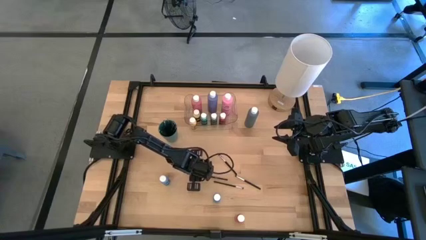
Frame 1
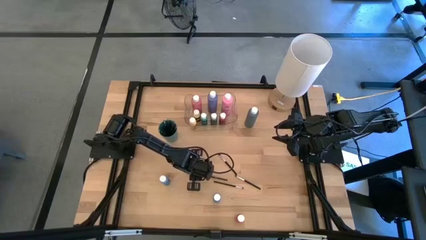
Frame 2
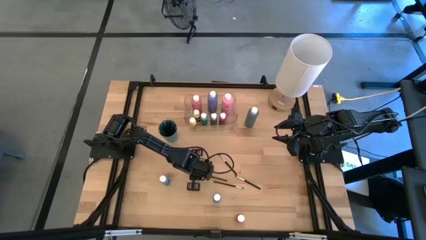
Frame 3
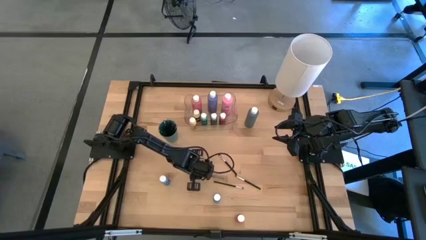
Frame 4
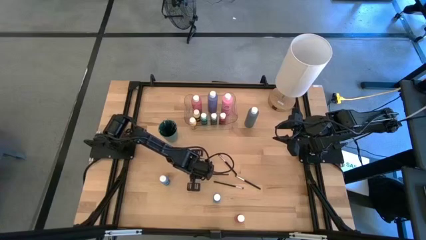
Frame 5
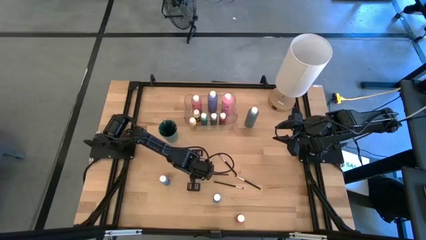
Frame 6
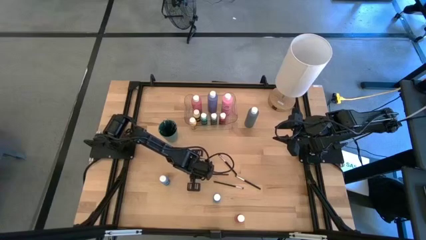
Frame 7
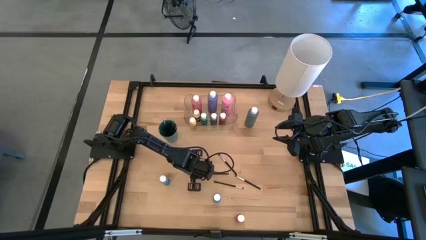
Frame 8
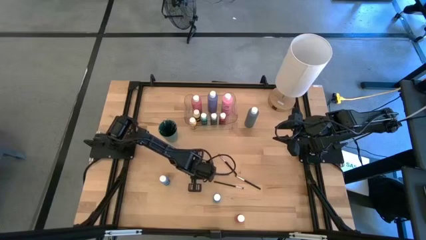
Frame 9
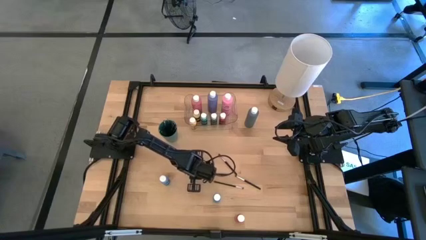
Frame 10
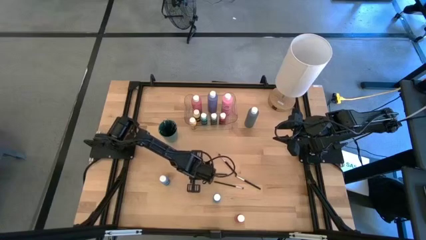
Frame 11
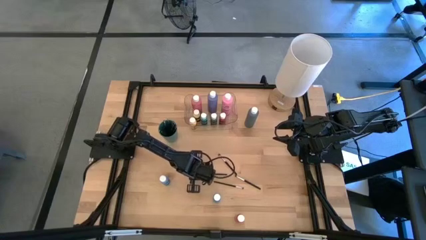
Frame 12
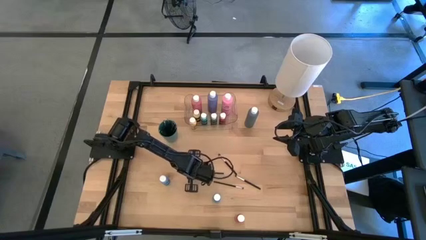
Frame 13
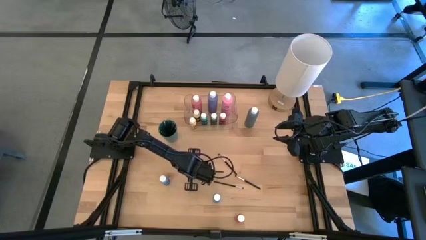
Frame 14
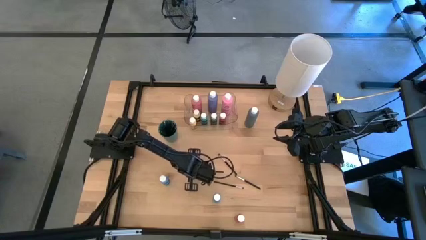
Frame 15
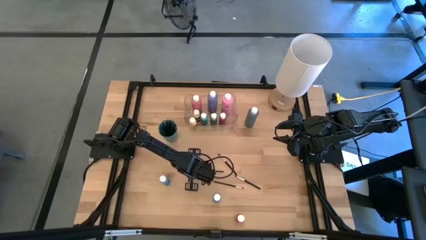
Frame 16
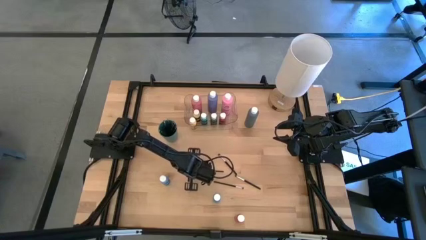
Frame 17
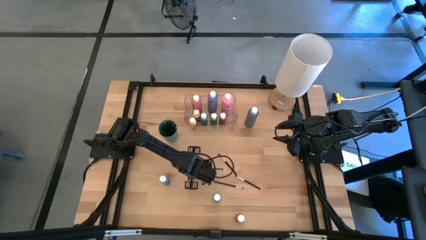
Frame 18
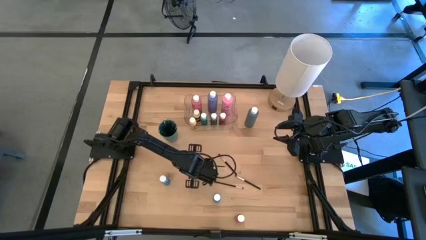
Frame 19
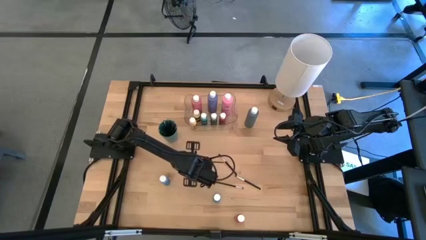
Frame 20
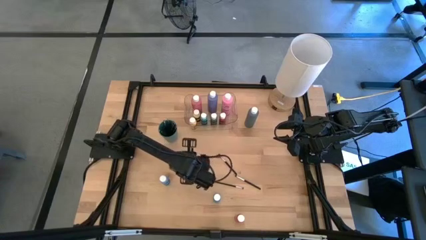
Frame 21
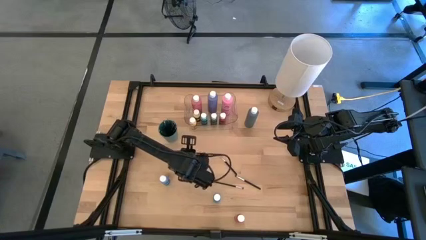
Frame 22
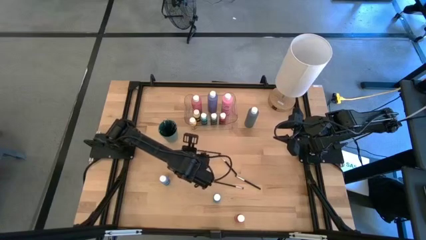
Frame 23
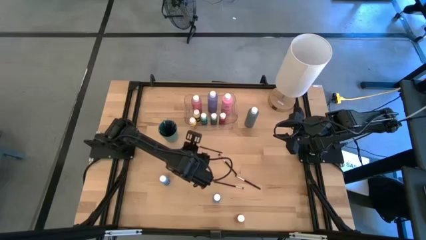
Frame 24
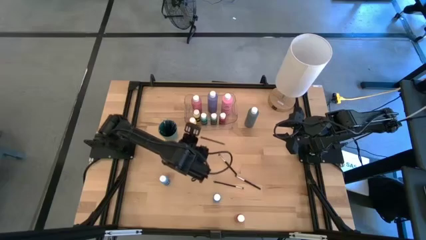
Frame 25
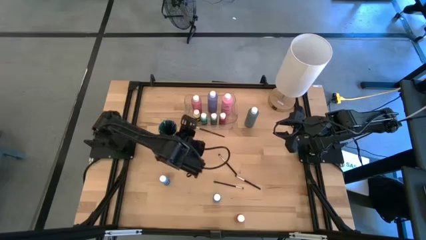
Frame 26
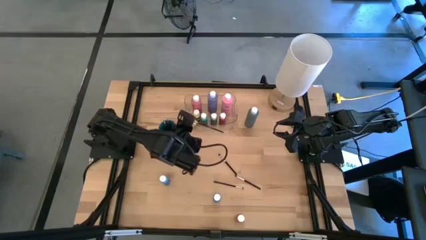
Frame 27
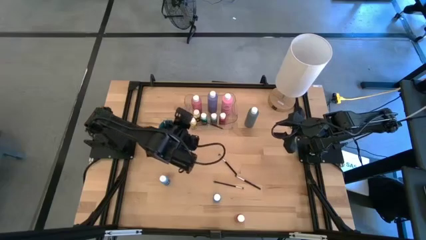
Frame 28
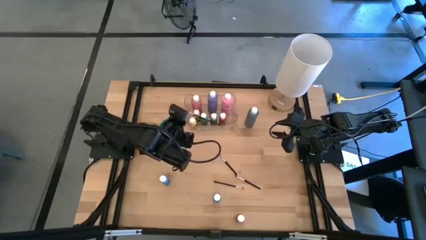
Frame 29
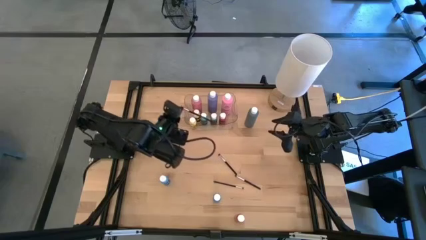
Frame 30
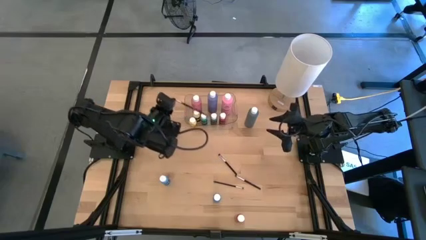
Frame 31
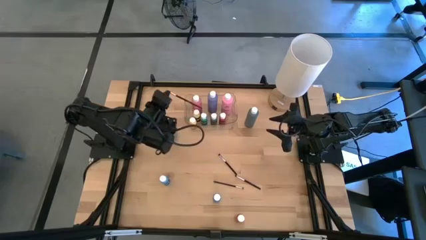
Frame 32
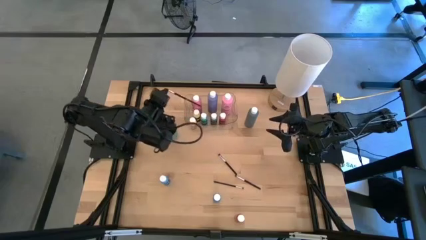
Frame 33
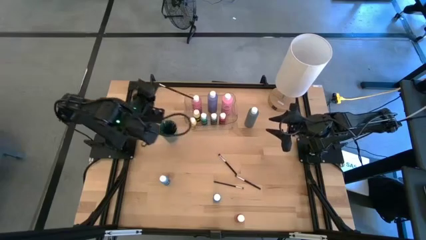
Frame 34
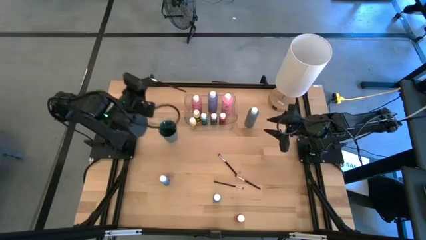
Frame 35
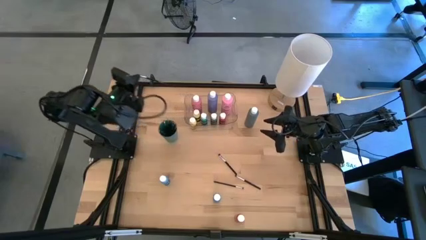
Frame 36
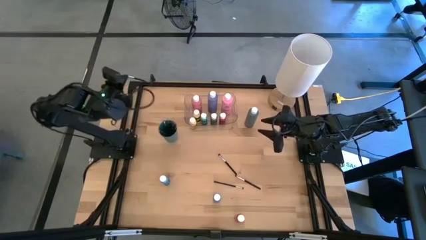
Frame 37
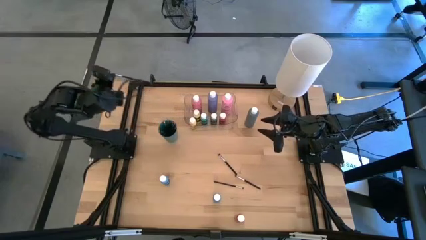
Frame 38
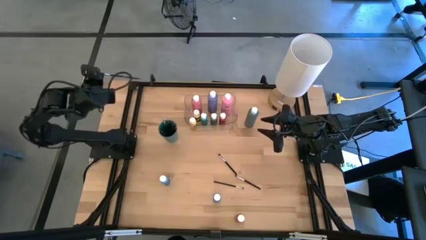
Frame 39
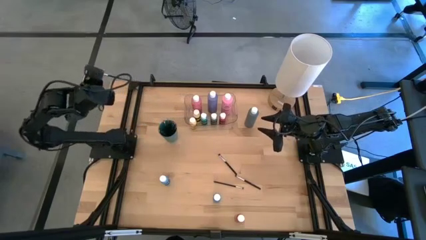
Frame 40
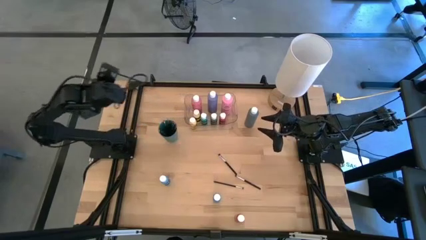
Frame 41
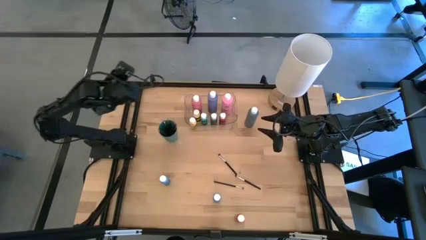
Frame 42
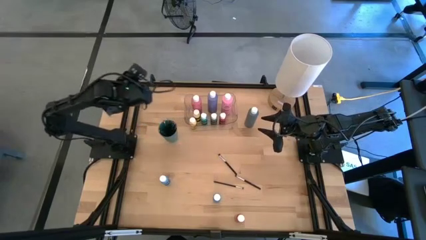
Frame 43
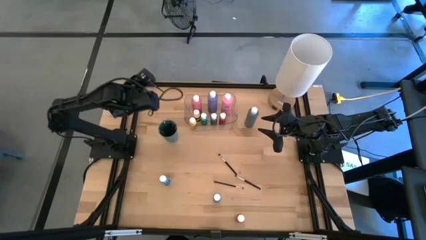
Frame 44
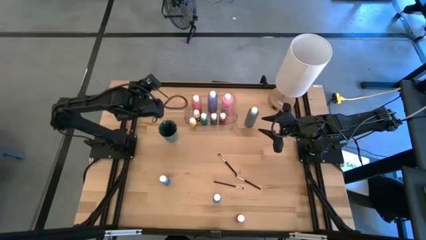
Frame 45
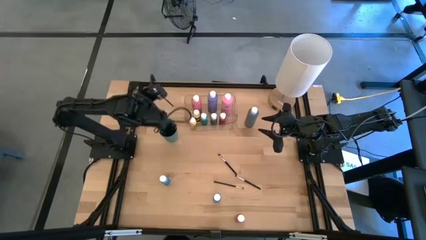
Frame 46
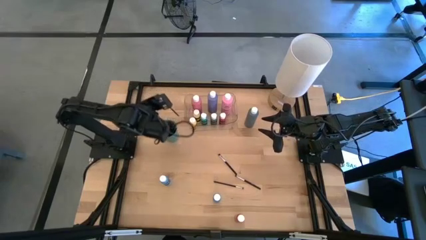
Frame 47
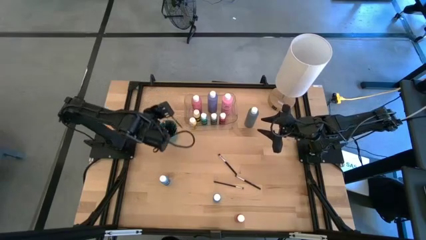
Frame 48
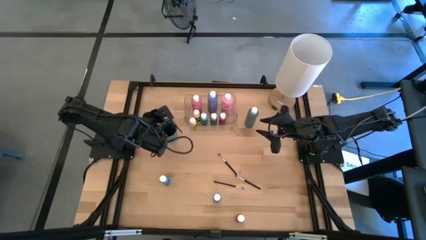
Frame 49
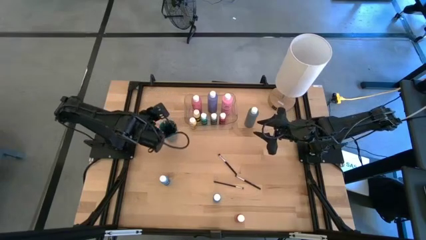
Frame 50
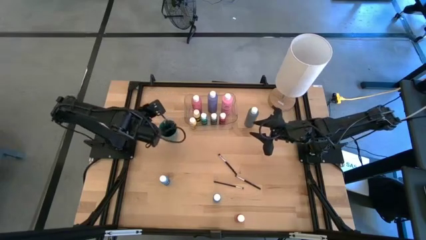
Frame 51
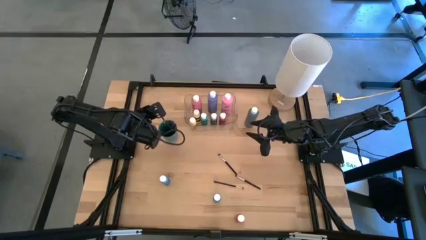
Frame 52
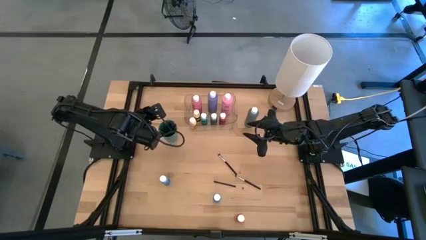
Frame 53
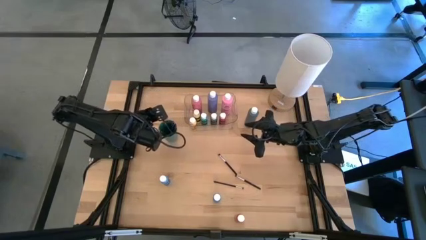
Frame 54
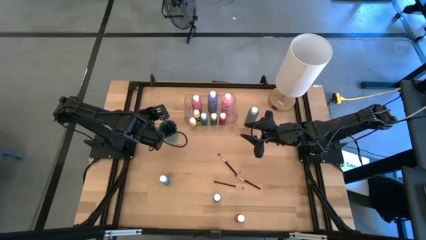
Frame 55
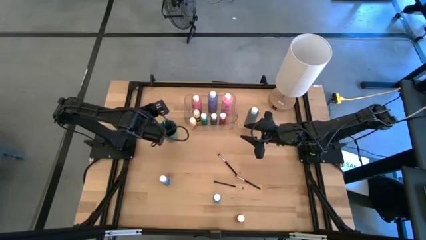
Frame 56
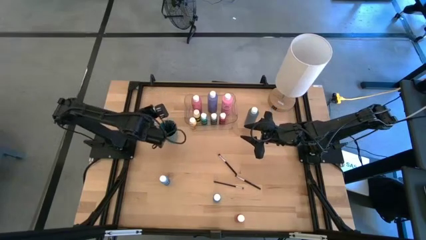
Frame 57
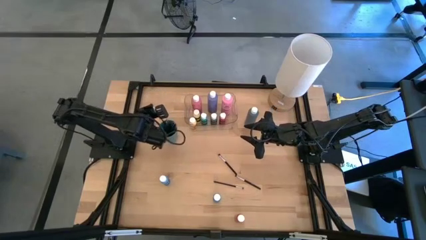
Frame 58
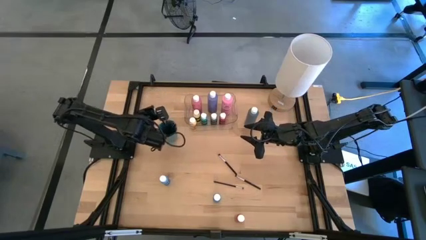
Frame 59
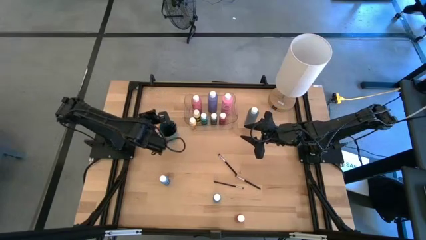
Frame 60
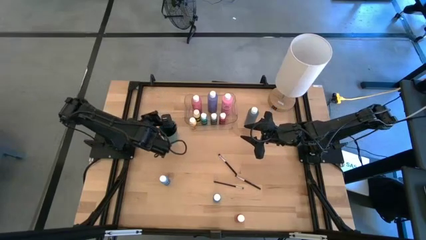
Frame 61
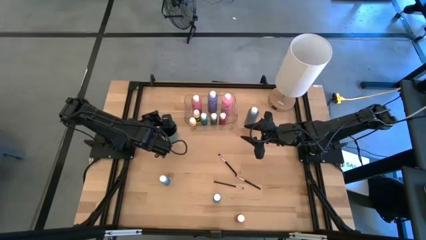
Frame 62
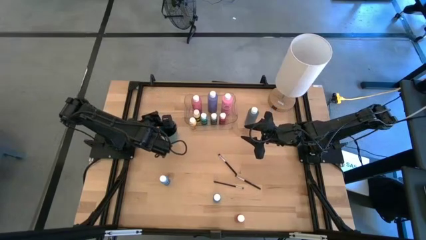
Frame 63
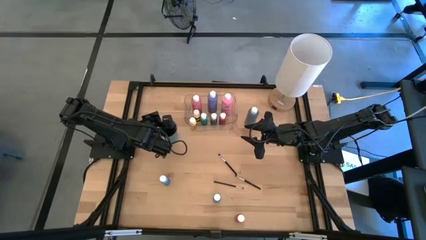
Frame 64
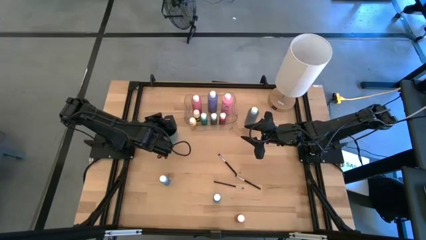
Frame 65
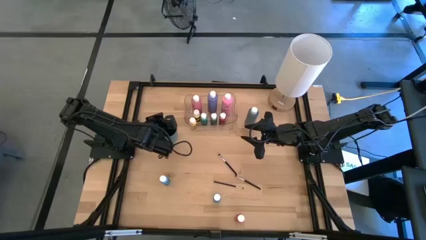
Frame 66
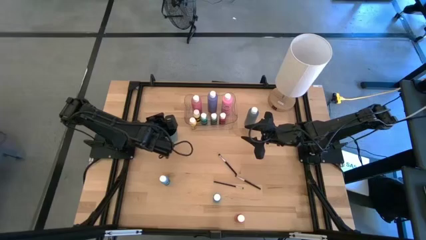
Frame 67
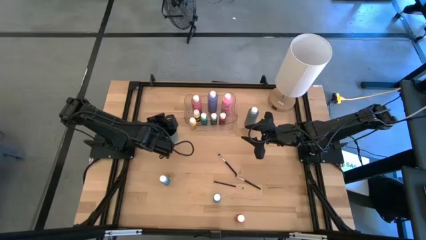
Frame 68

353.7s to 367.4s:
Task: Pick & Place Paint Supplies
Put the black paint brush into the green cup

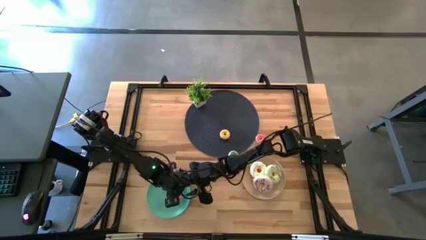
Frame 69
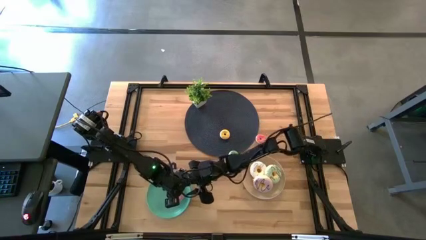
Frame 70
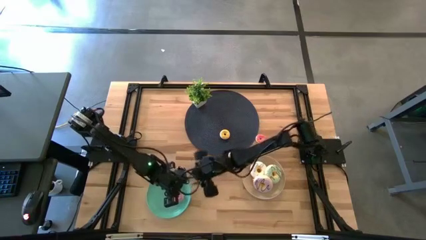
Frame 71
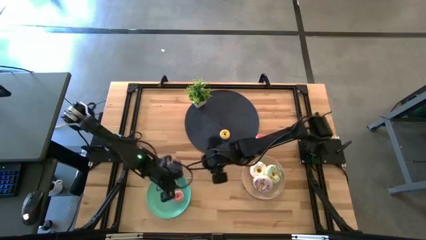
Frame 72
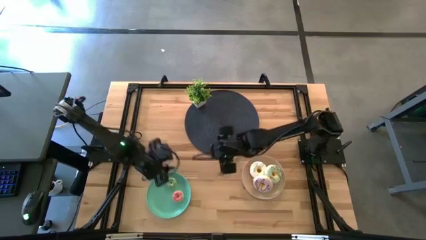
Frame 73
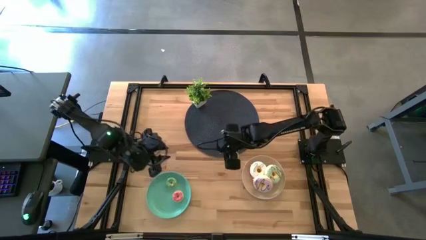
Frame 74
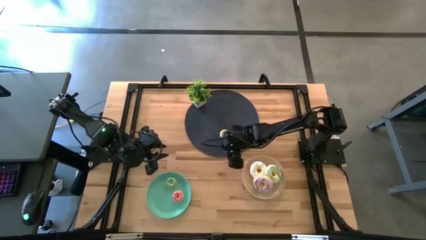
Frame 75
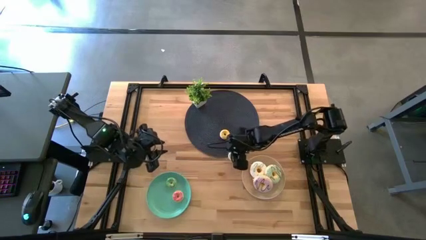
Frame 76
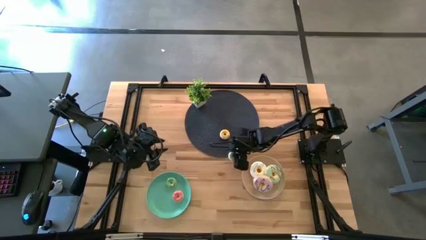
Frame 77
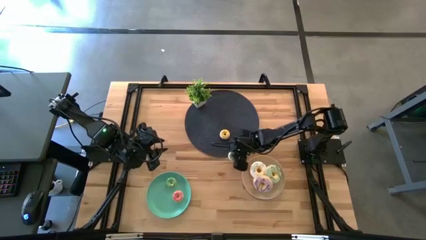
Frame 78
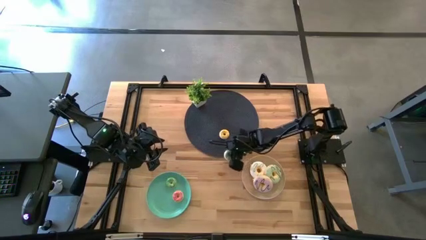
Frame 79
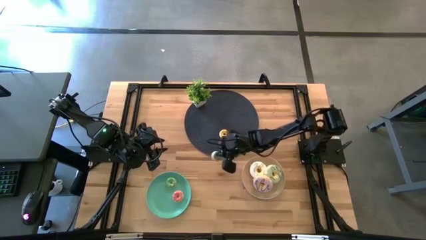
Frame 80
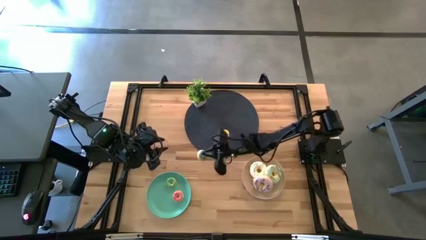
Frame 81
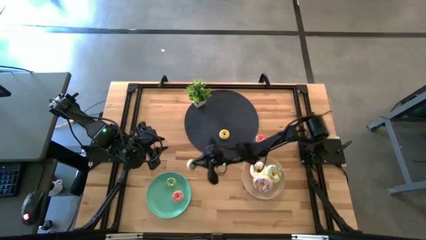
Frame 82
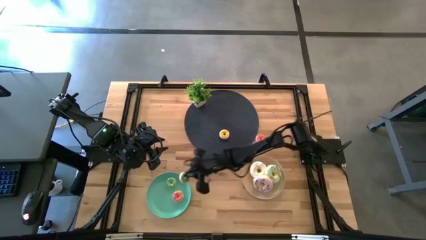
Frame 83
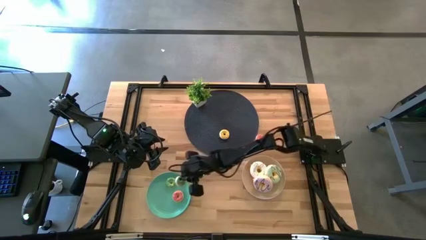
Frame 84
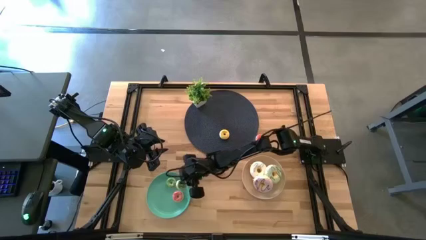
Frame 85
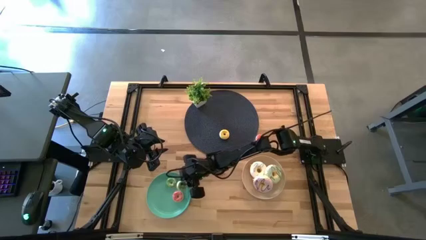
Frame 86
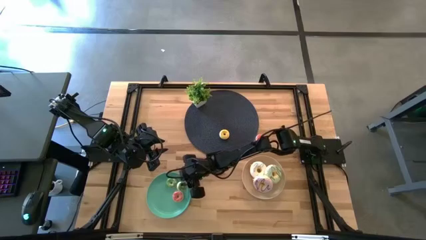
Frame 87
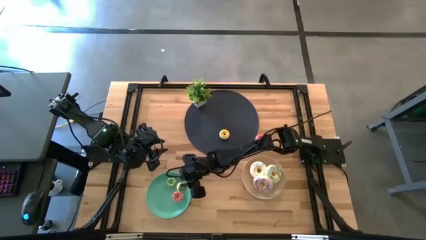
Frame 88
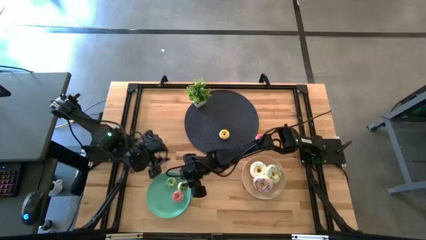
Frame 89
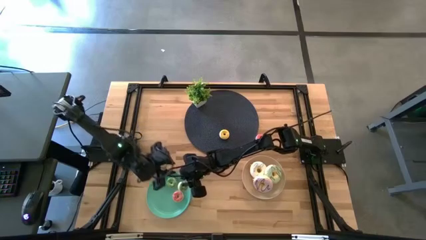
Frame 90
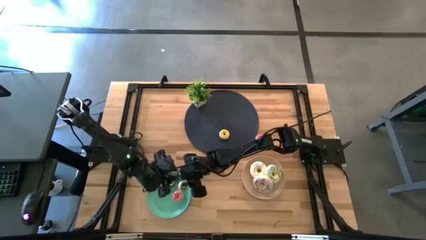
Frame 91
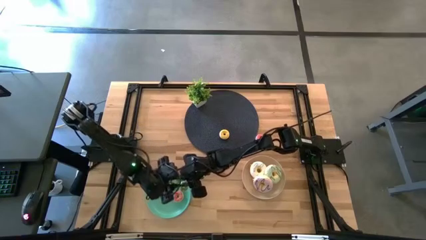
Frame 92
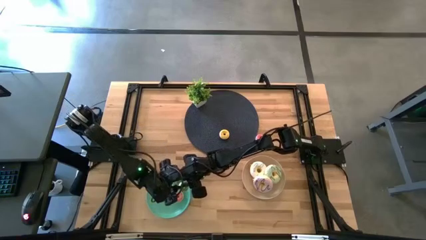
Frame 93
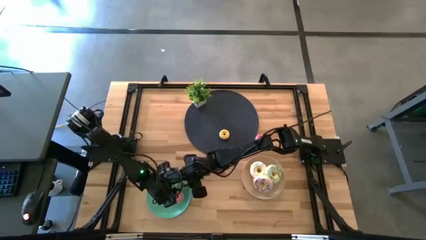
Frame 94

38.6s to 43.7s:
Task: Pick & Place donuts
Put the small green donut on the blue plate
